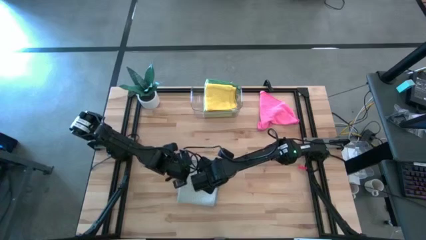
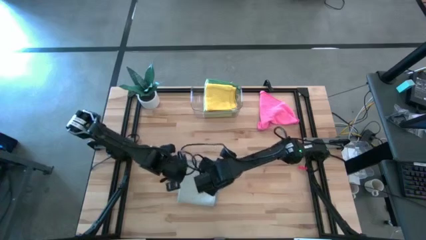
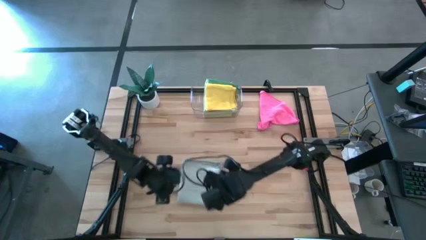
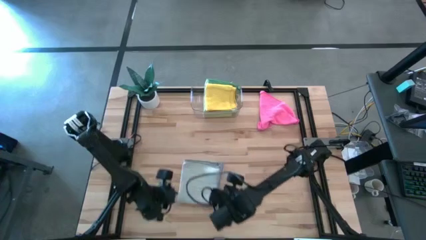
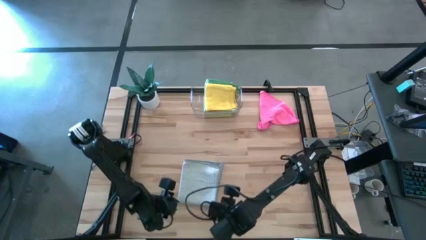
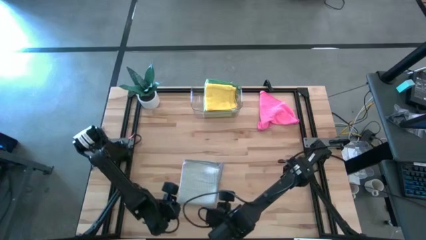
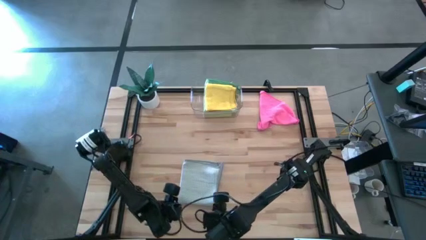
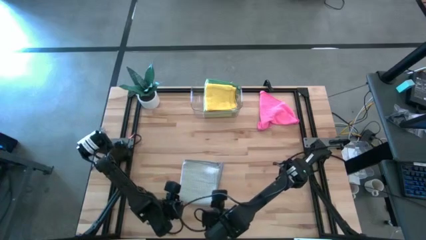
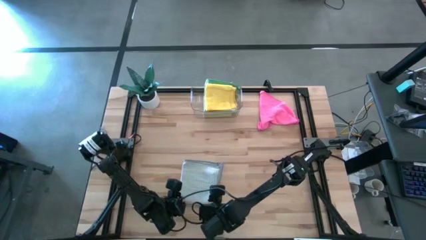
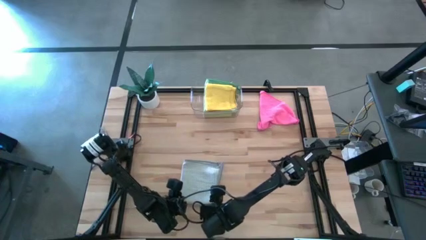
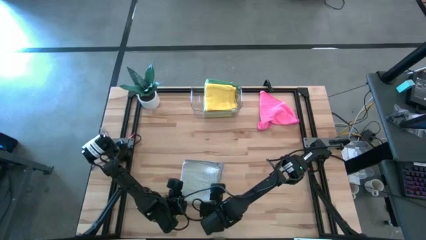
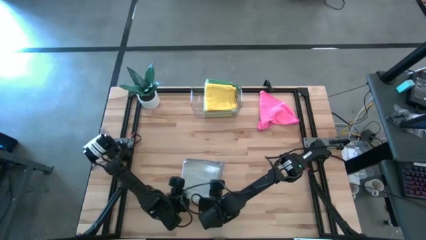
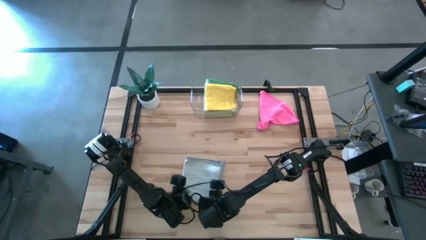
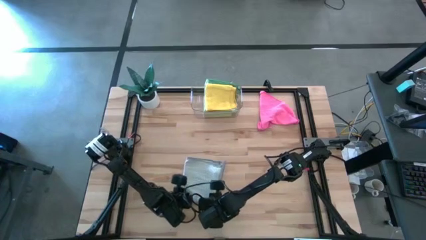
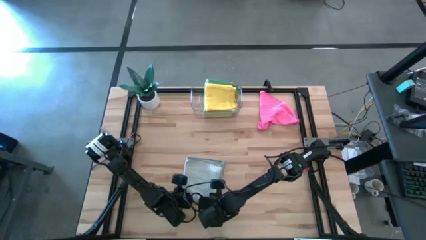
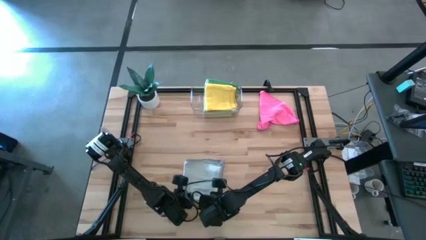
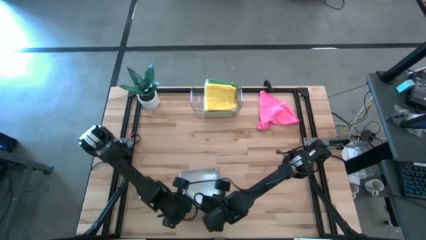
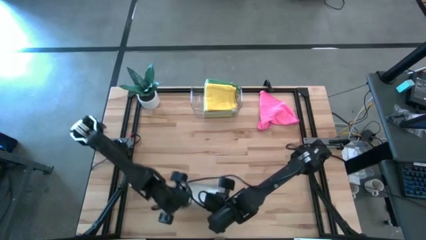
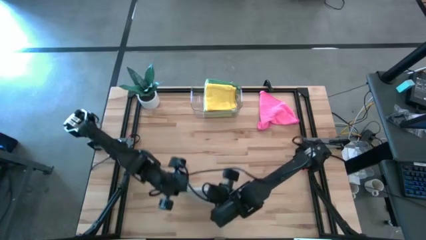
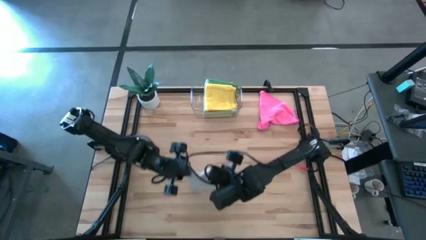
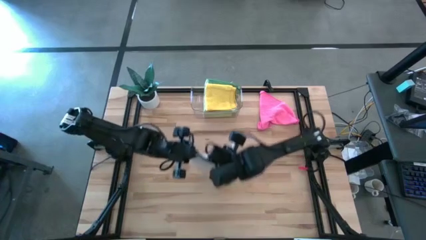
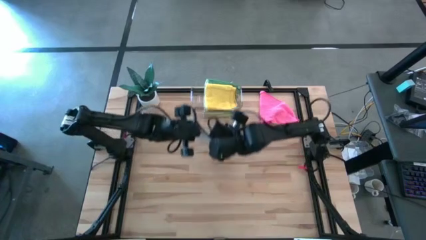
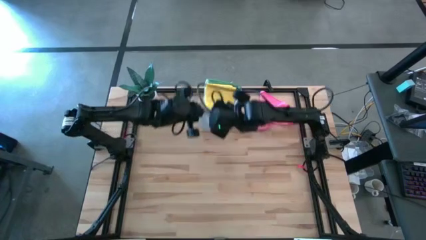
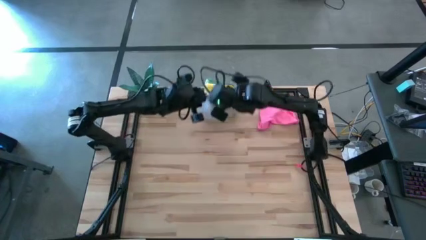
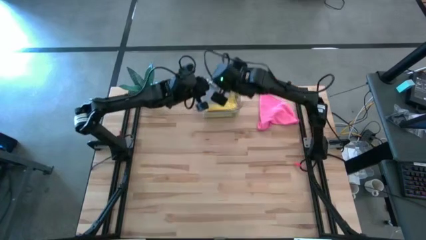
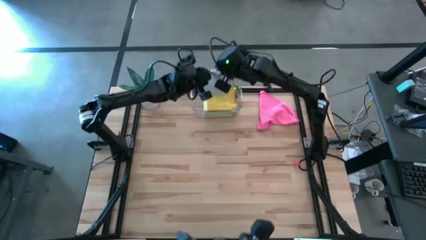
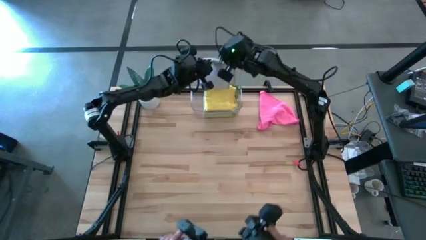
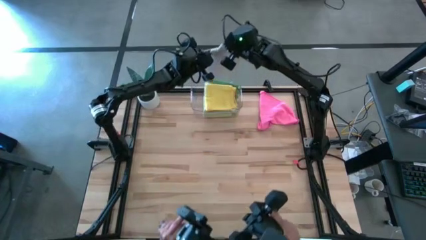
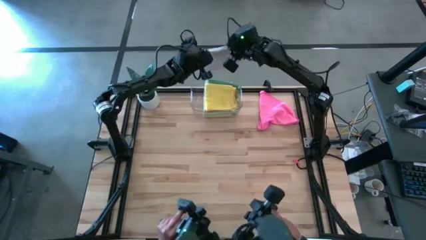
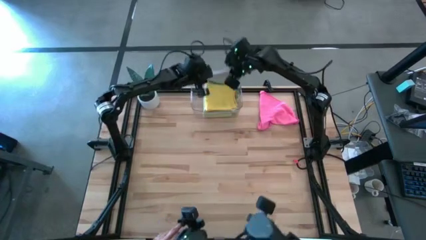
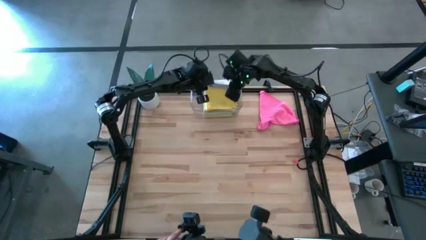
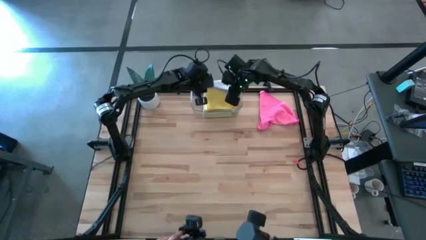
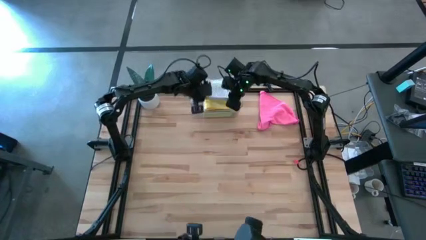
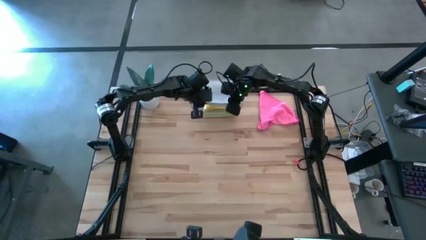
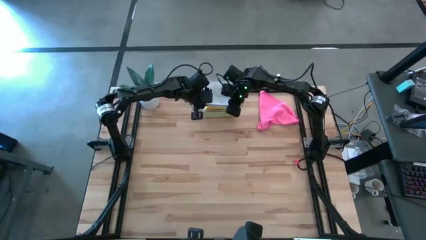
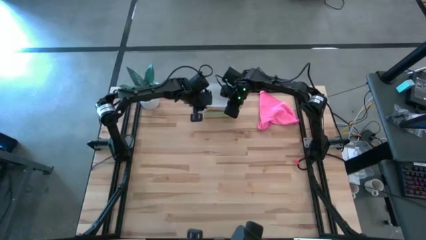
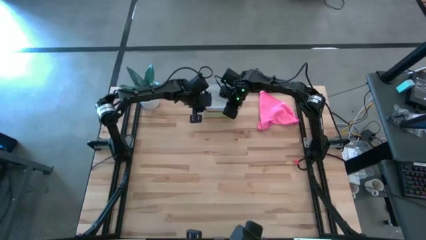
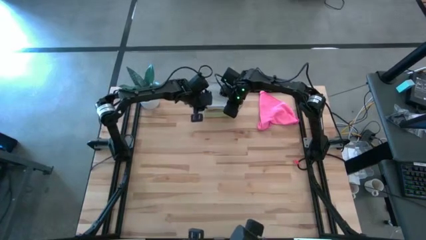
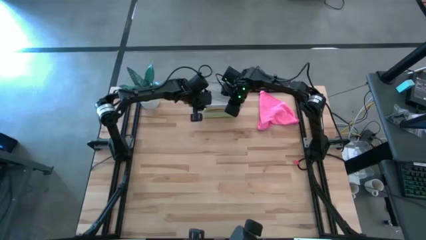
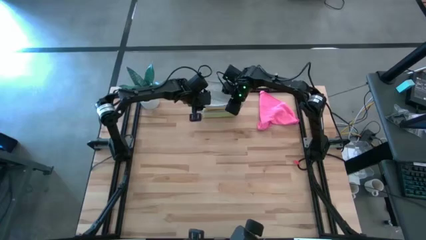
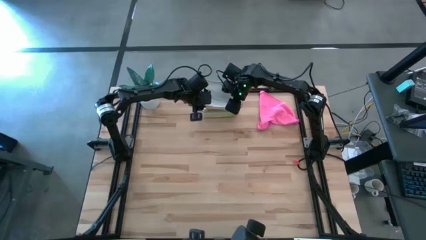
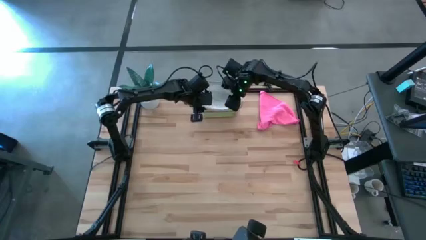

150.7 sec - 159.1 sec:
Task: Fold microfiber towels
Put the gray microfiber cloth into the transparent bin

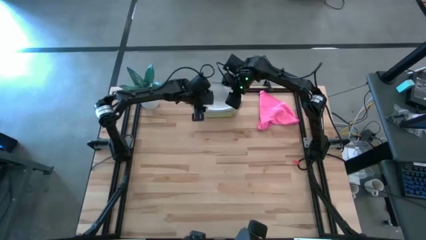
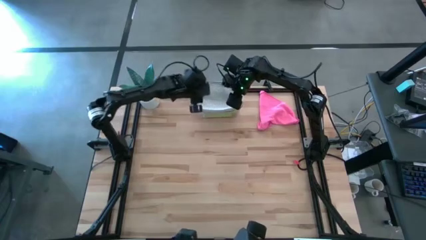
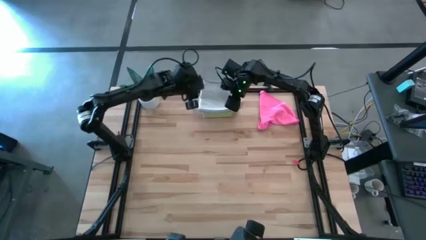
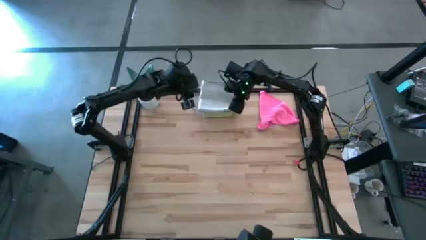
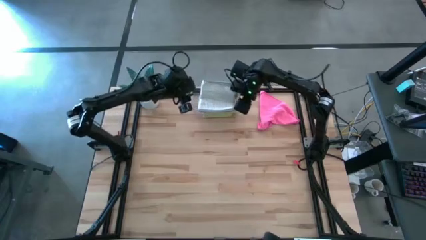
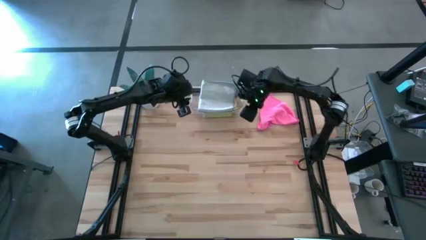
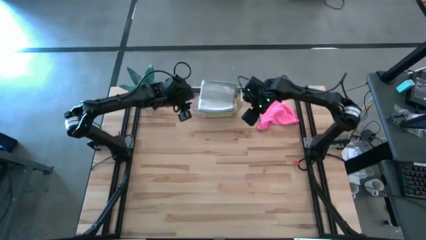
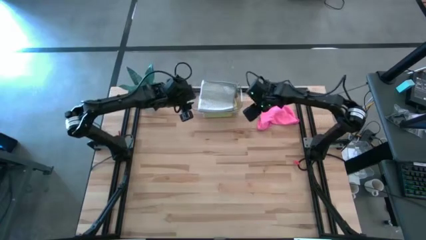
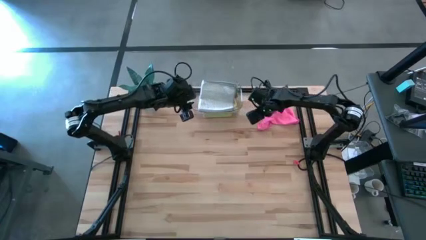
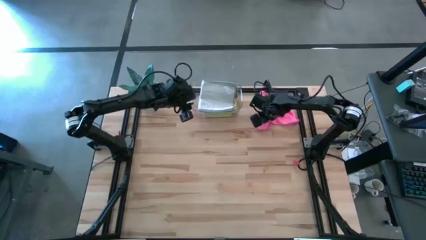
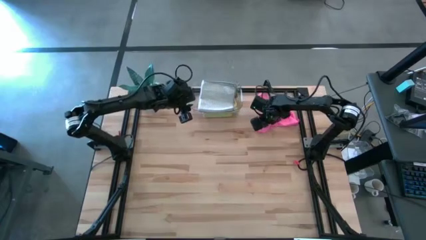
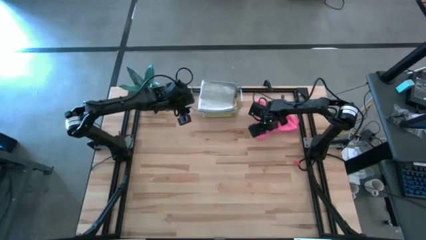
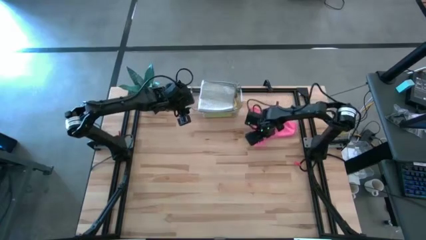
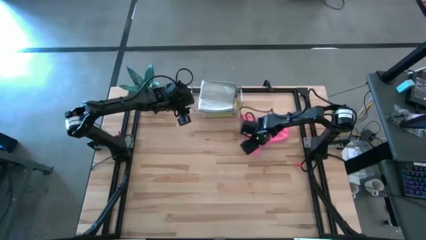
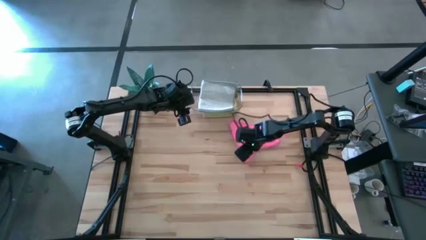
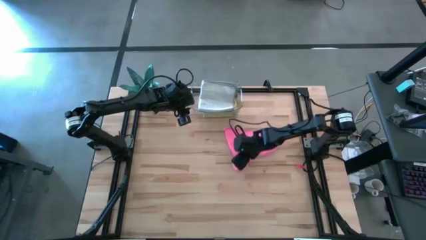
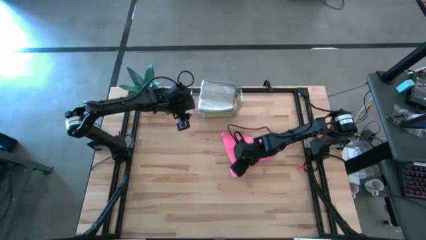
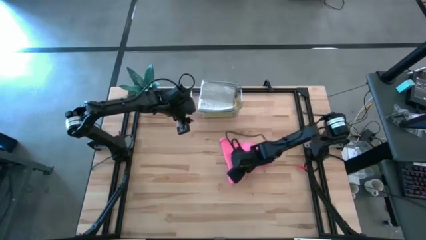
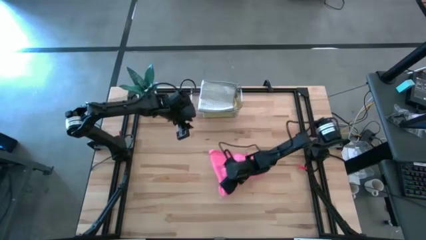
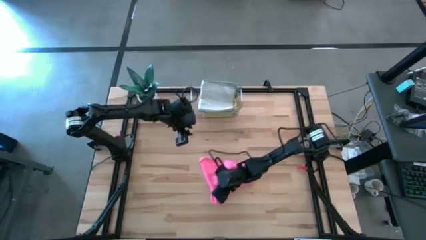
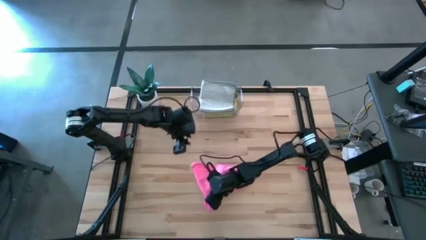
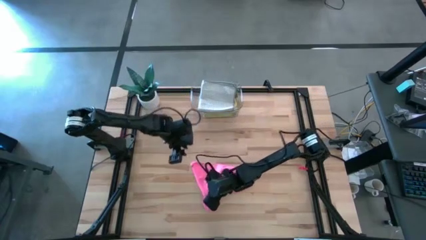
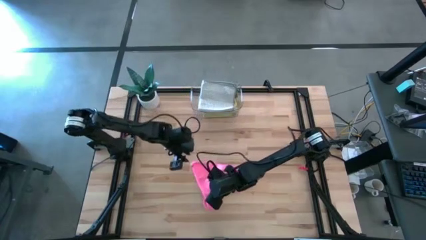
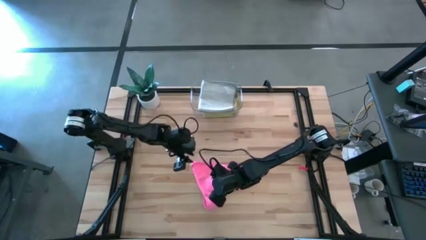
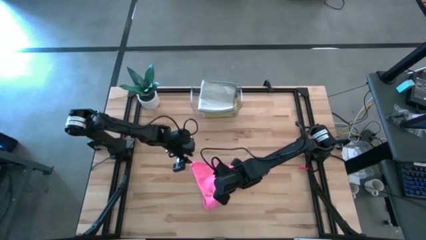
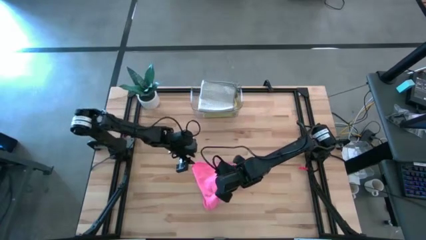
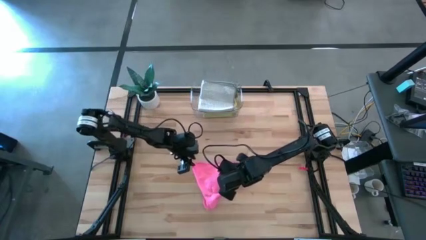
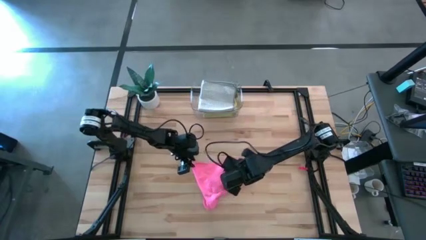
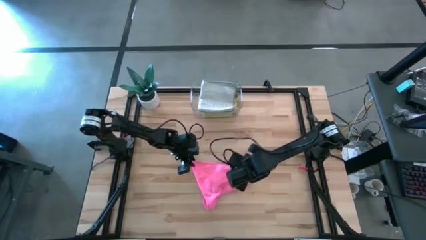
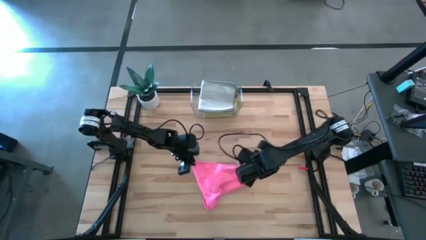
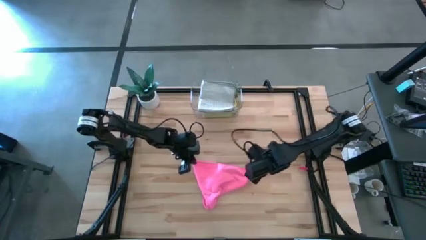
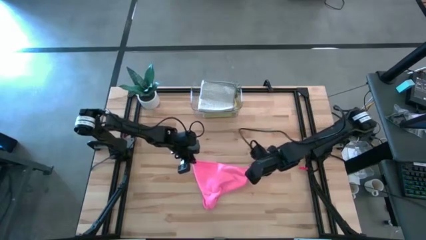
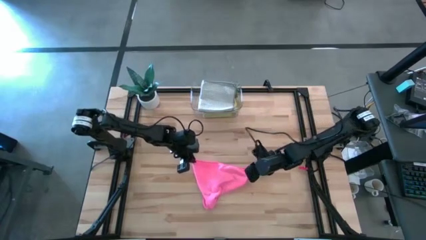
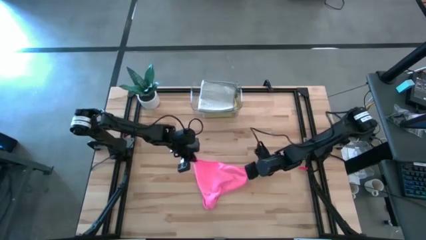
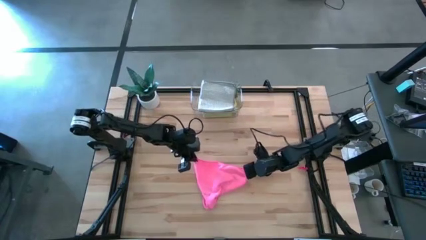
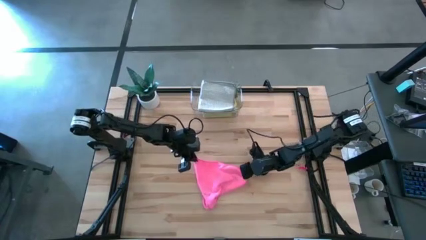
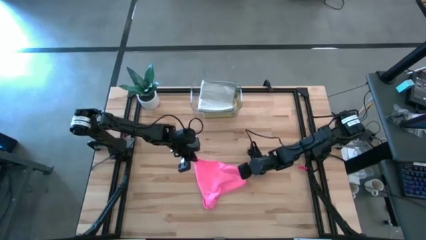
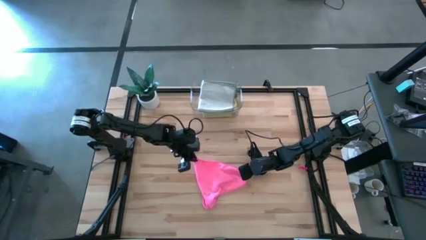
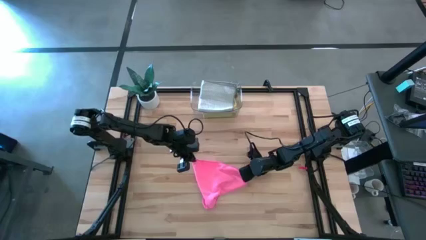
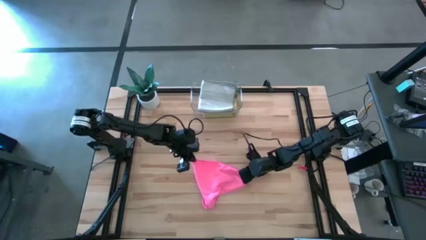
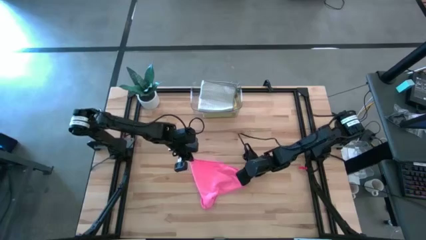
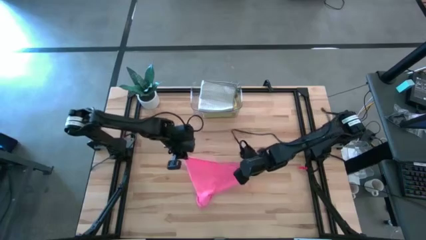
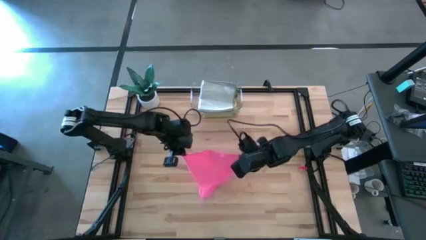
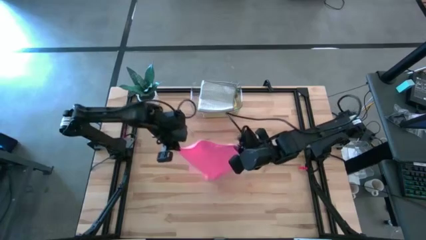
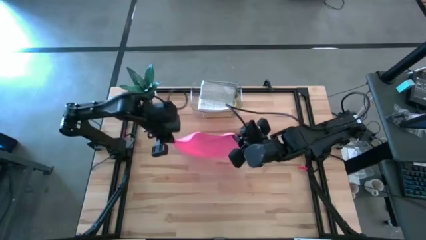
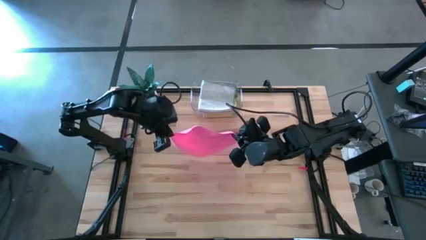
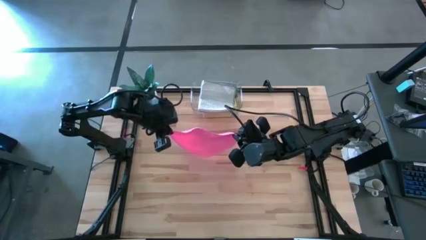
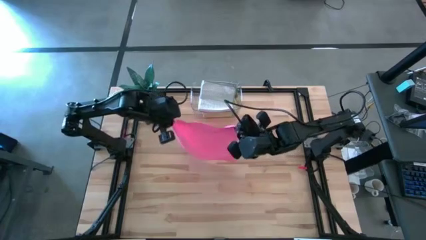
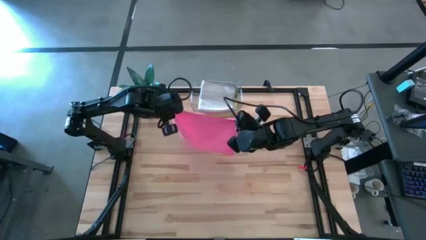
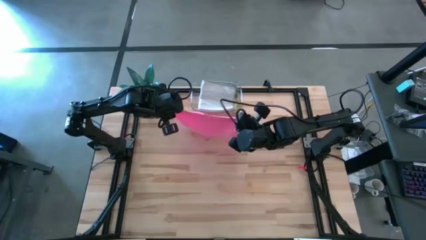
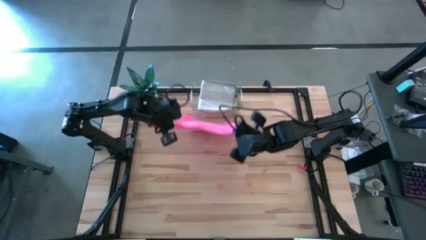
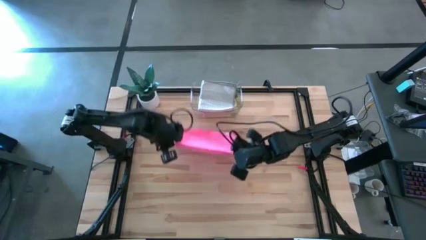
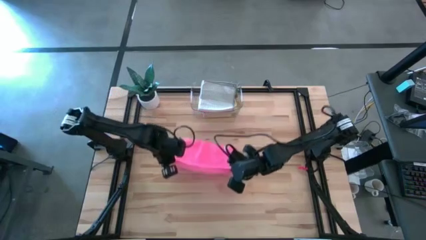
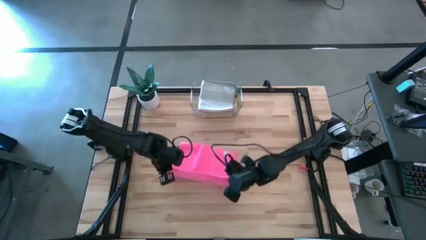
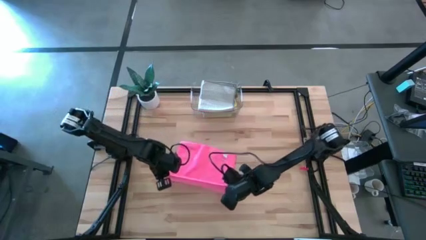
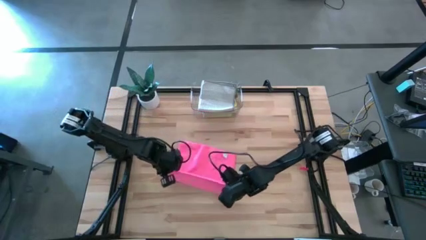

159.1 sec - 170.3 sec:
Fold the pink microfiber cloth
